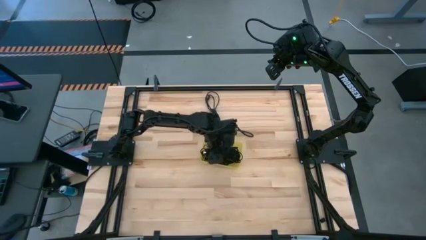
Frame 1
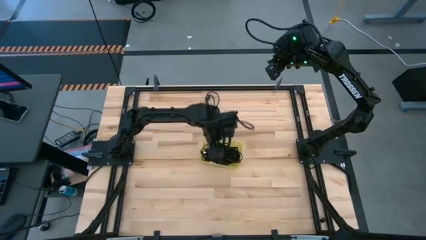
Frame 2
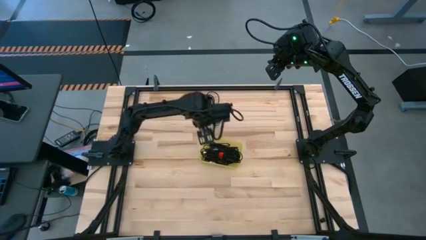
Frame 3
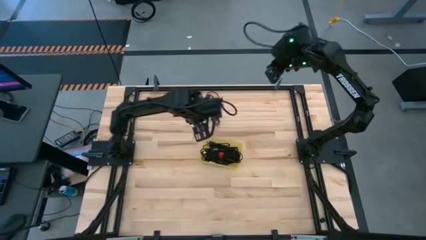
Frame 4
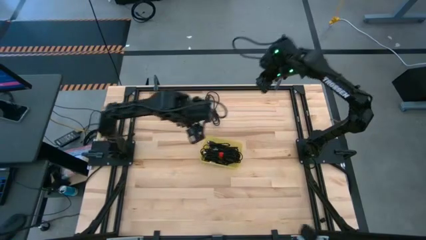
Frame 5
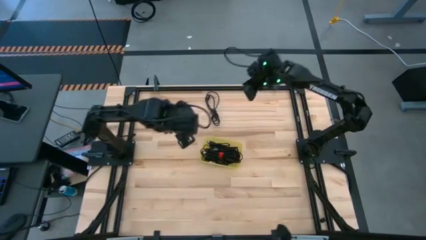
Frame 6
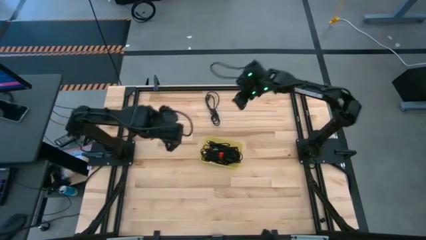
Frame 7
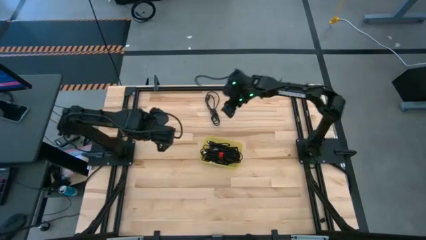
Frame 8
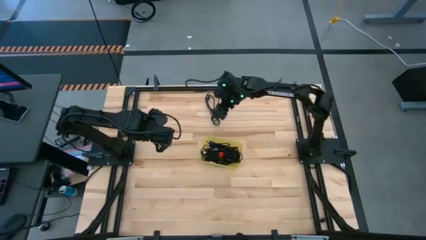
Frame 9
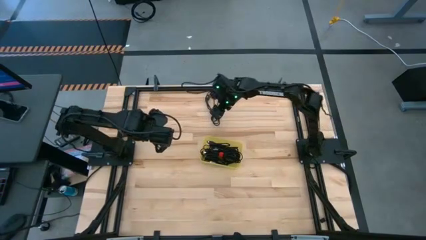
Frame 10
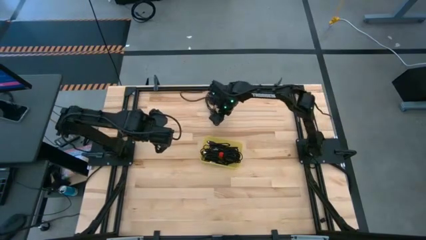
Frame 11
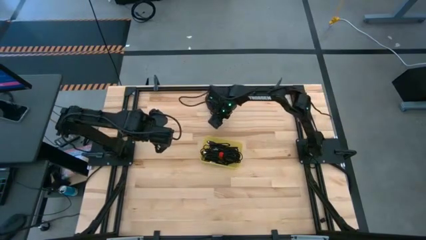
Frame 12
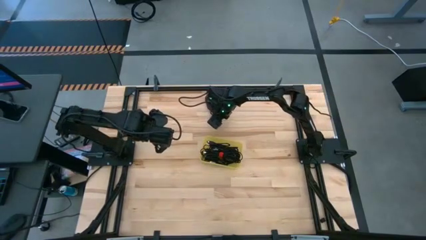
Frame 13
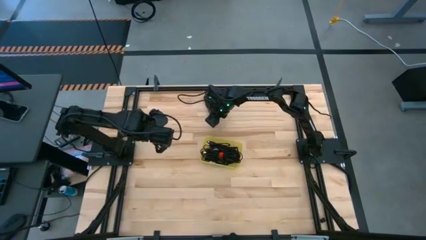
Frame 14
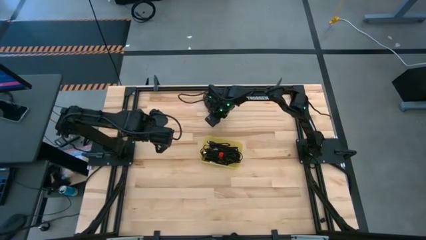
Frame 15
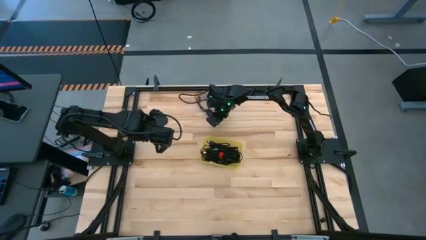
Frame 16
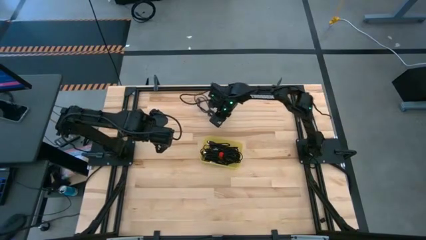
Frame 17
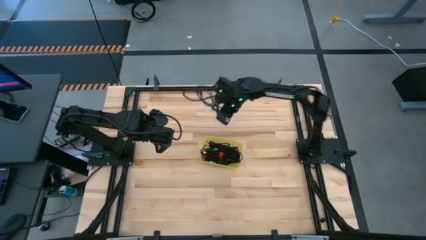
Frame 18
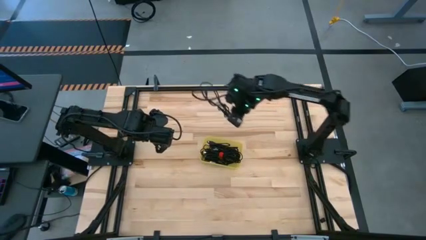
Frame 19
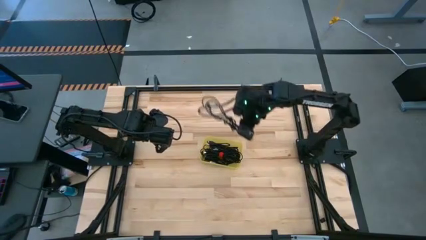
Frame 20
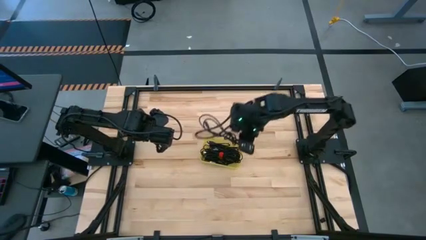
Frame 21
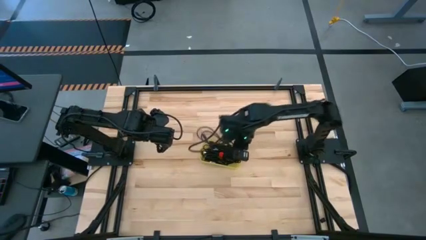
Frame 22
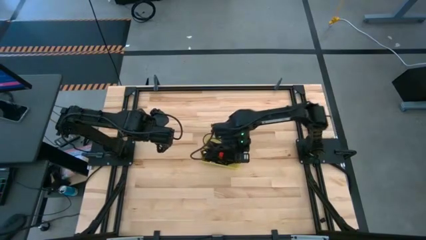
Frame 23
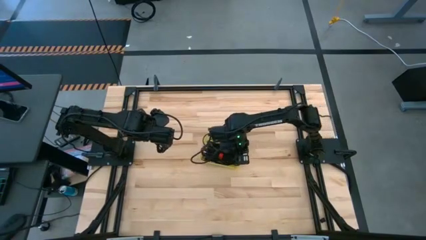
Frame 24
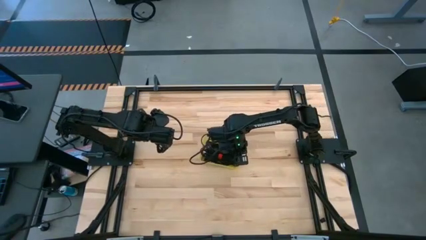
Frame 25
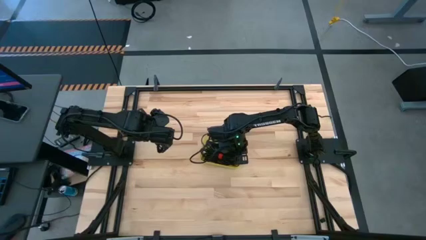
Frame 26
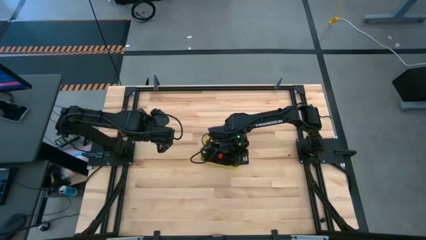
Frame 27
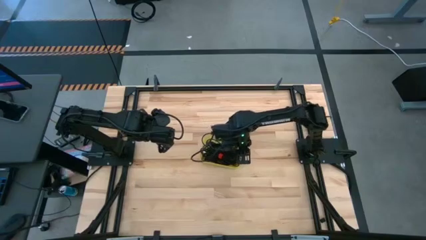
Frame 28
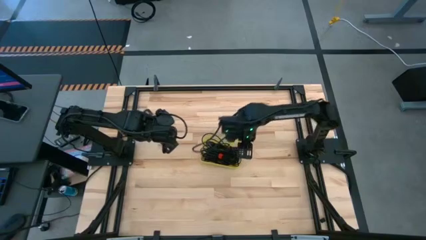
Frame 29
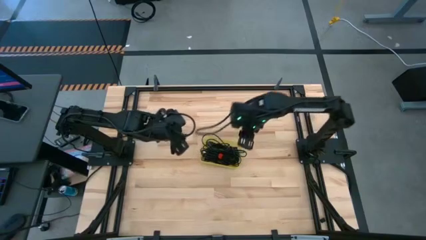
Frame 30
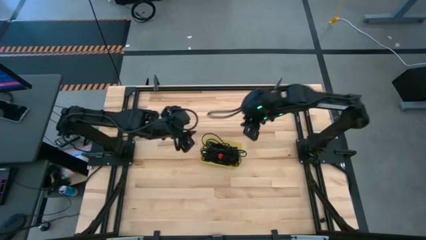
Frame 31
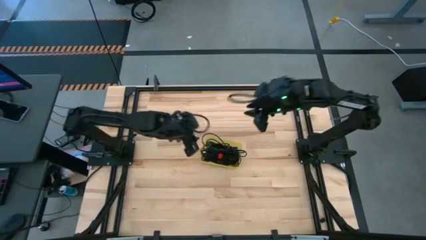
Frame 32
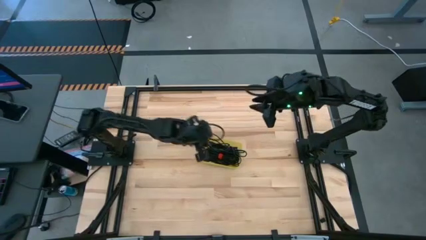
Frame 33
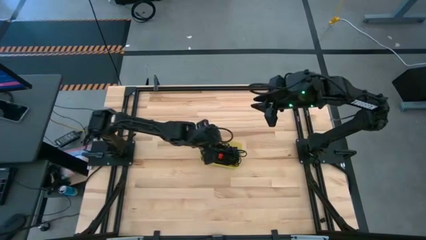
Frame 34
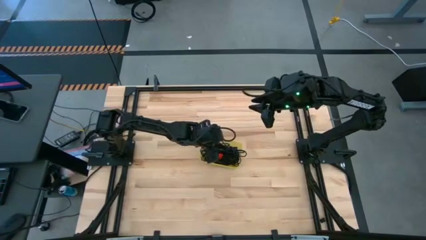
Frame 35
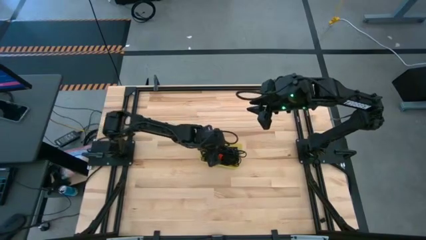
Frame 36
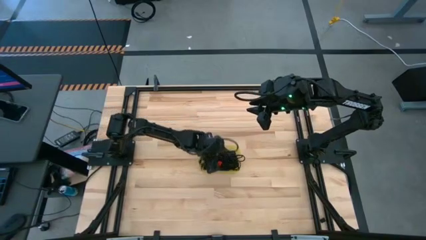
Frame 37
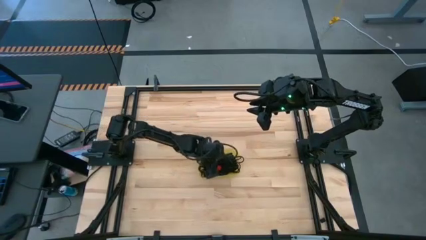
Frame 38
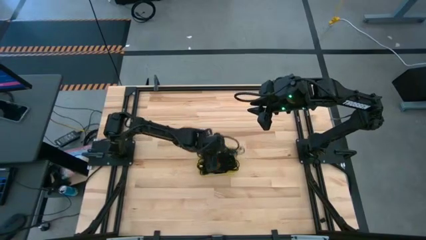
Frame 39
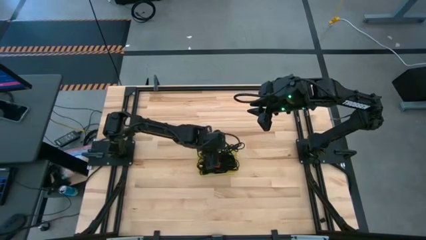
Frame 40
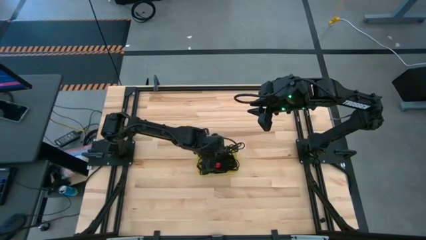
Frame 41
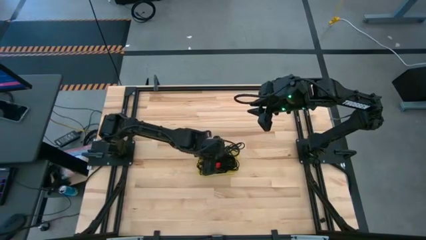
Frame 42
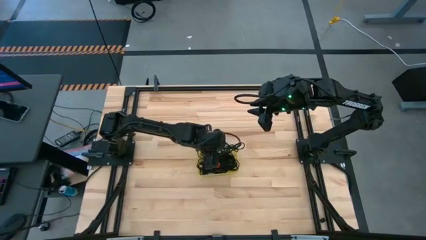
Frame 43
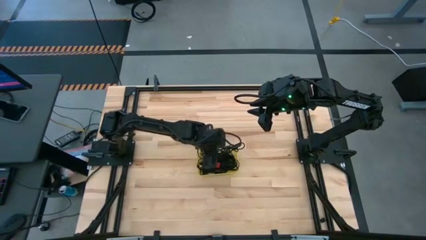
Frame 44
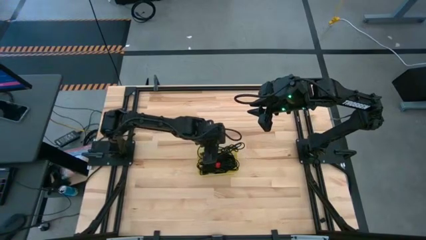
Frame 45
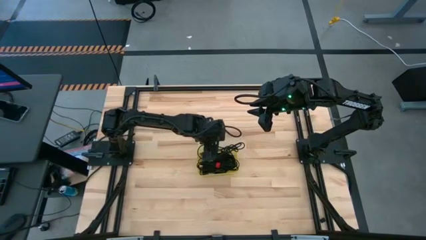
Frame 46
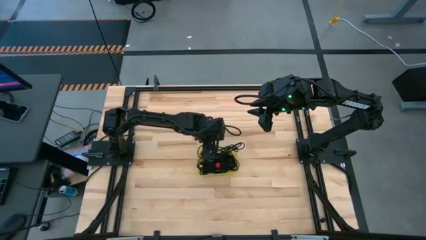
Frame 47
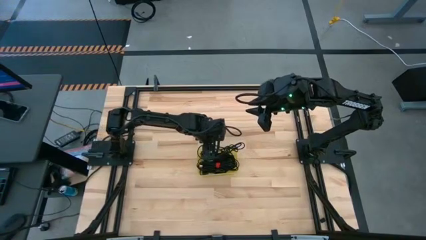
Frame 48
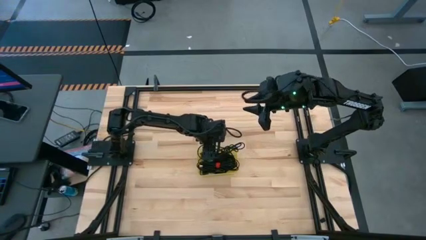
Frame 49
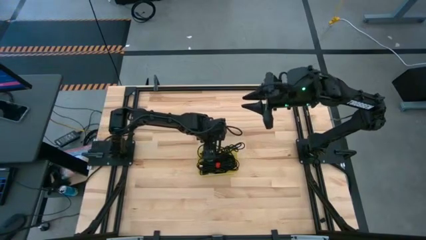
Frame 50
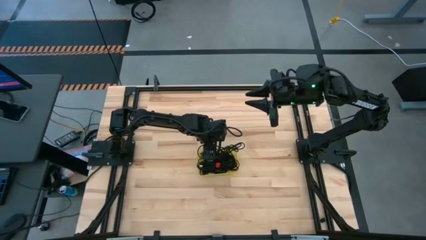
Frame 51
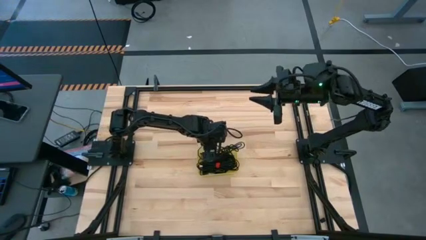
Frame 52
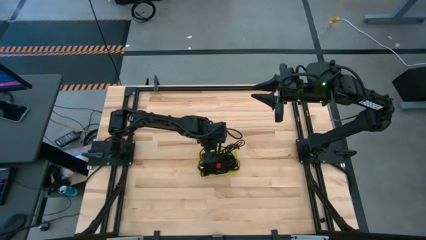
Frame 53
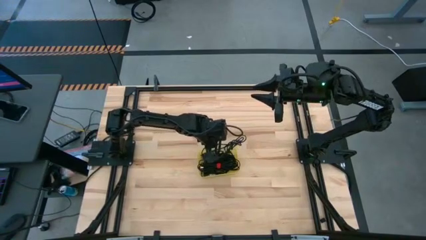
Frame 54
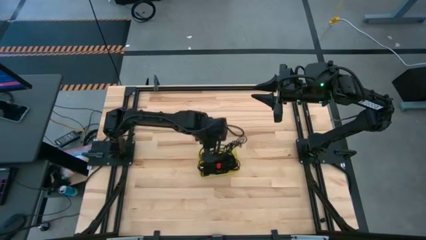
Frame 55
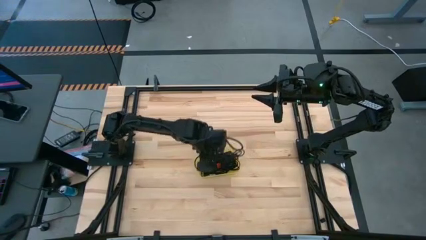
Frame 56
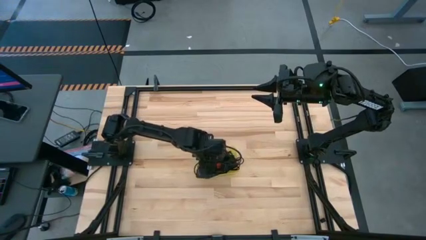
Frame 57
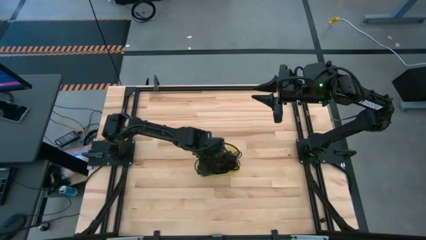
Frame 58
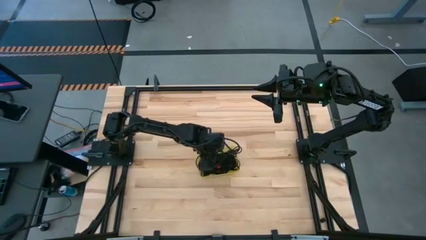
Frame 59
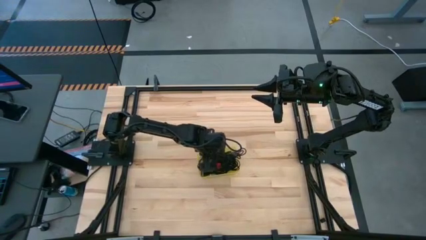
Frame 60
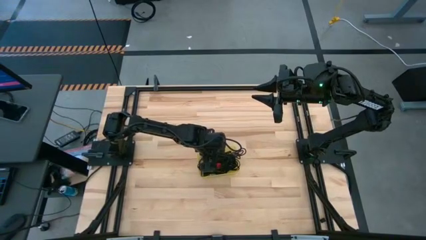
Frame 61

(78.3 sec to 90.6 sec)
Task: Pick and place USB-C Cables
Put the black charger cable into the yellow bin
